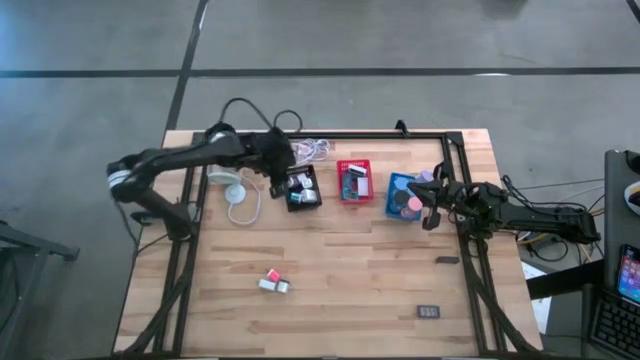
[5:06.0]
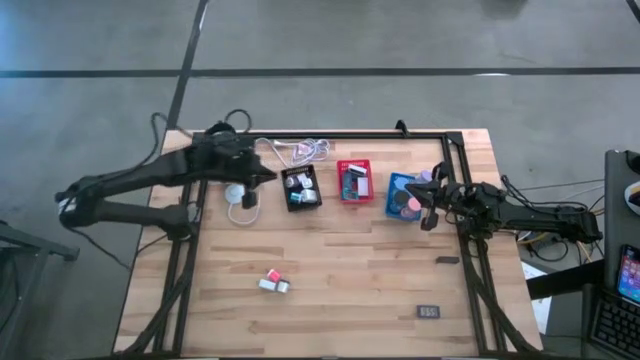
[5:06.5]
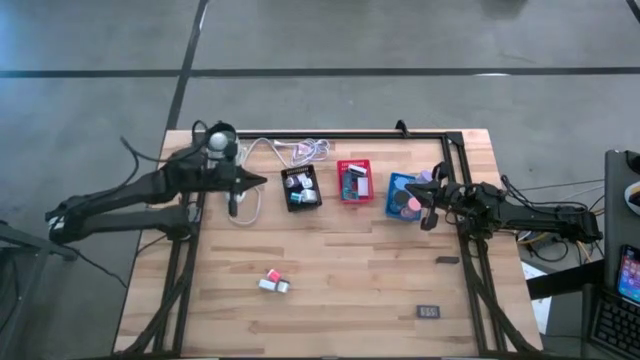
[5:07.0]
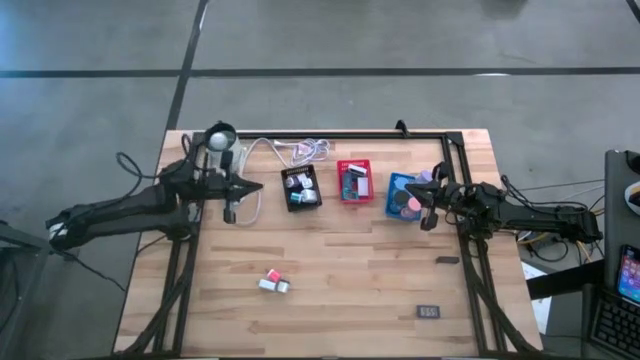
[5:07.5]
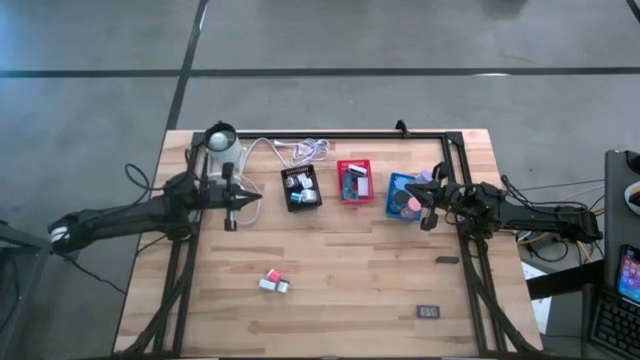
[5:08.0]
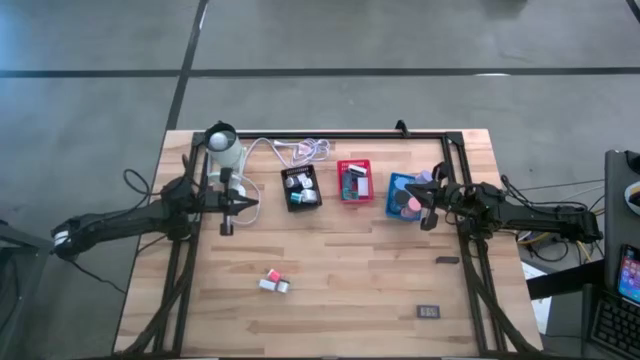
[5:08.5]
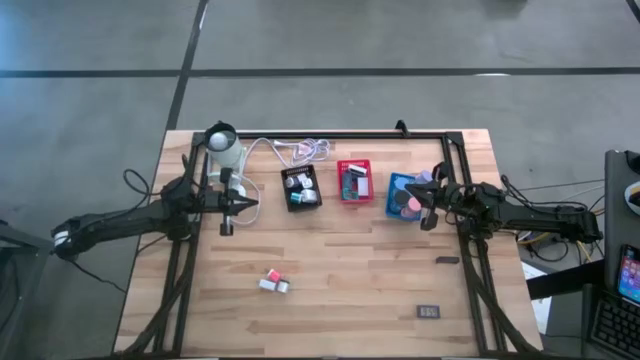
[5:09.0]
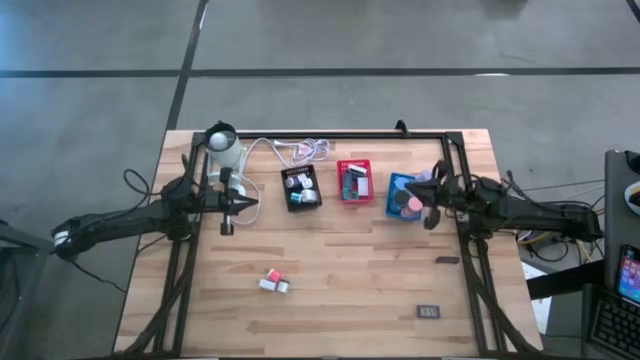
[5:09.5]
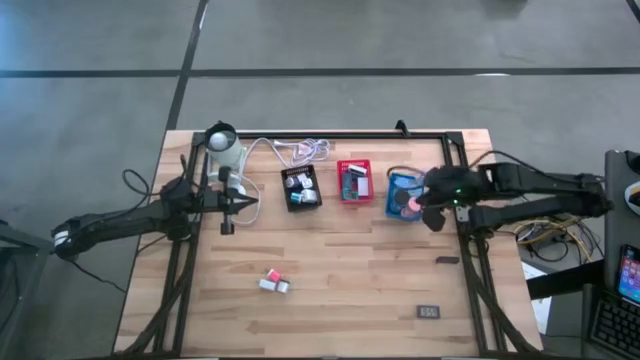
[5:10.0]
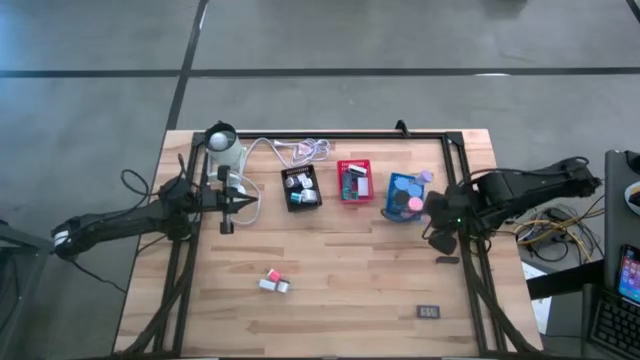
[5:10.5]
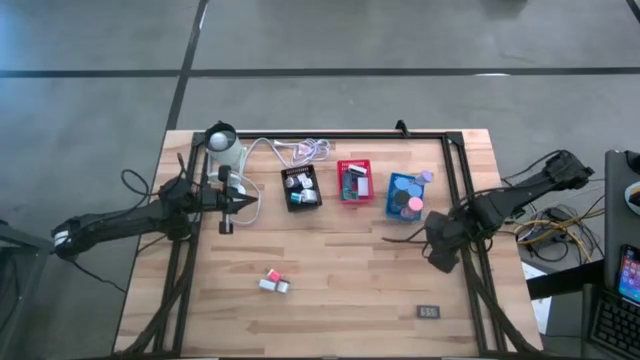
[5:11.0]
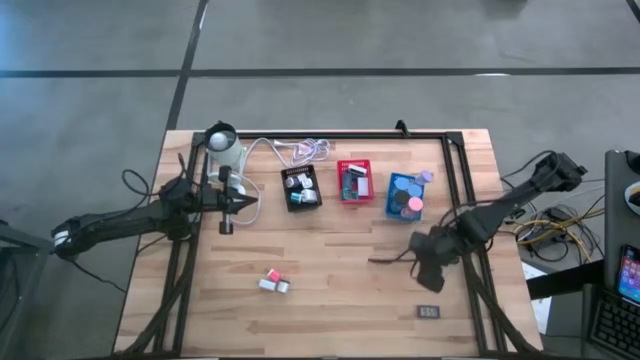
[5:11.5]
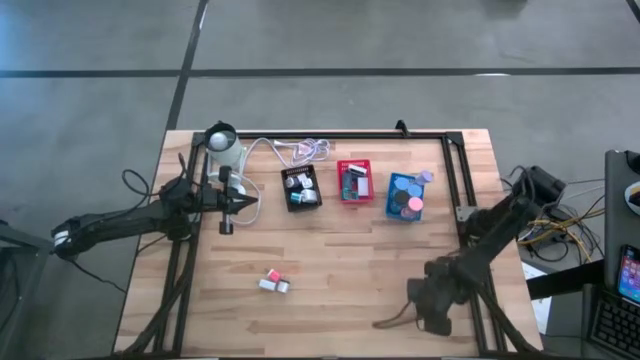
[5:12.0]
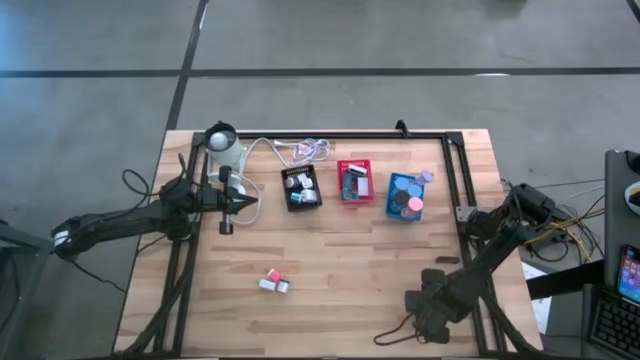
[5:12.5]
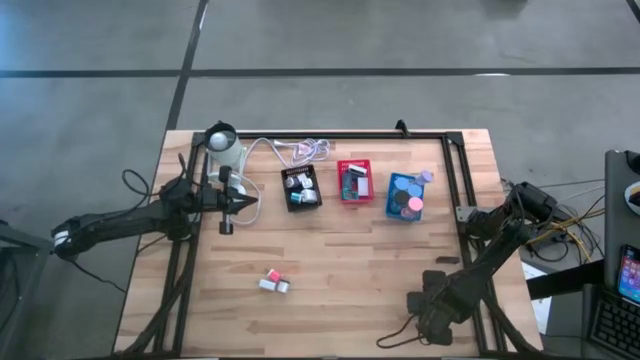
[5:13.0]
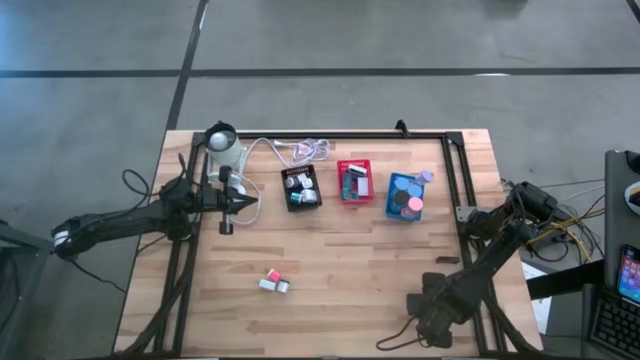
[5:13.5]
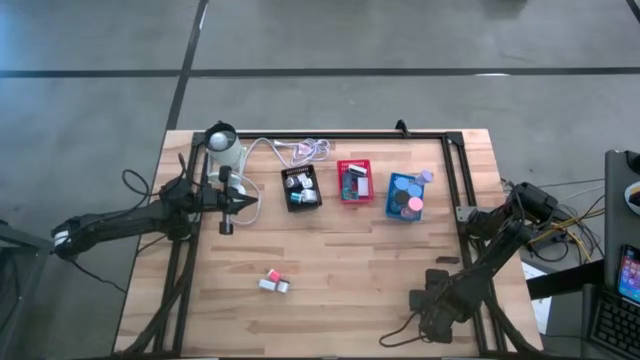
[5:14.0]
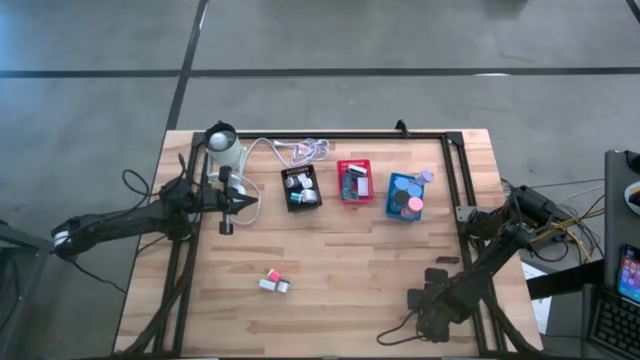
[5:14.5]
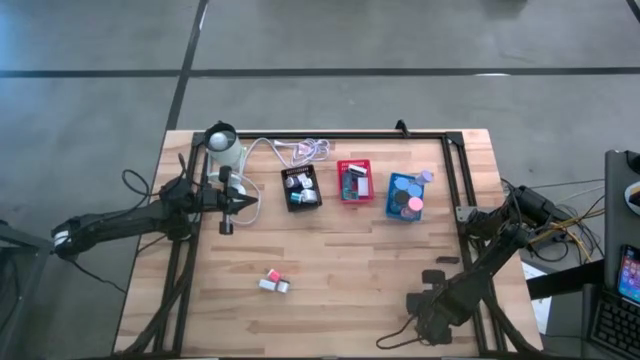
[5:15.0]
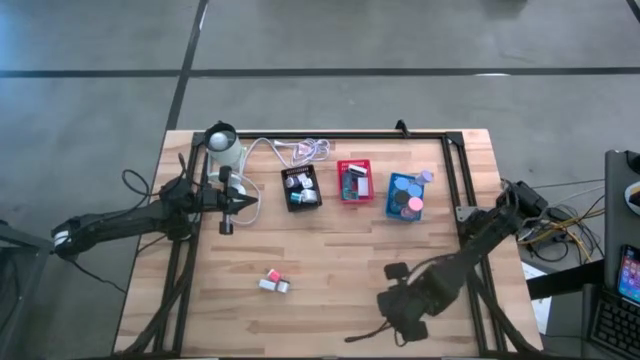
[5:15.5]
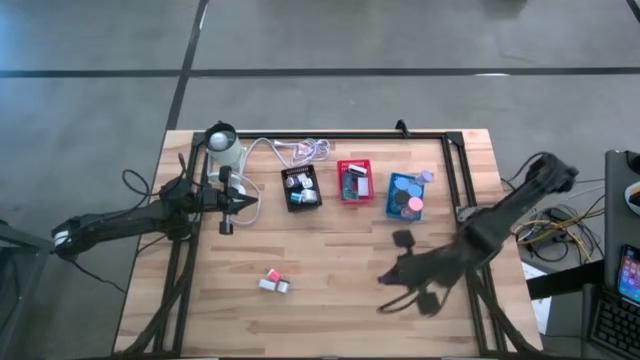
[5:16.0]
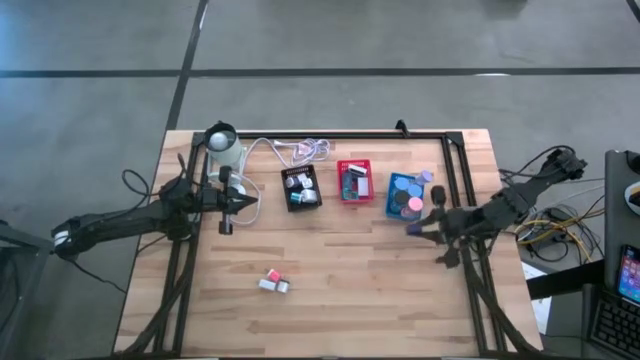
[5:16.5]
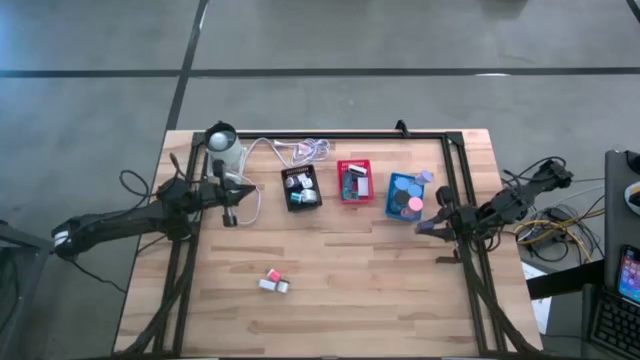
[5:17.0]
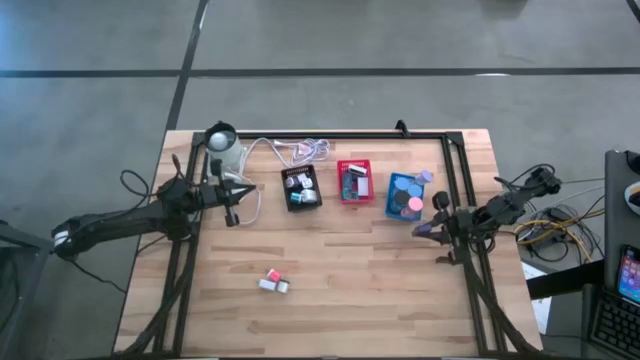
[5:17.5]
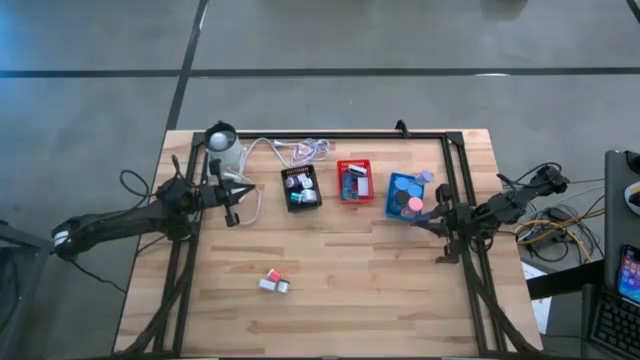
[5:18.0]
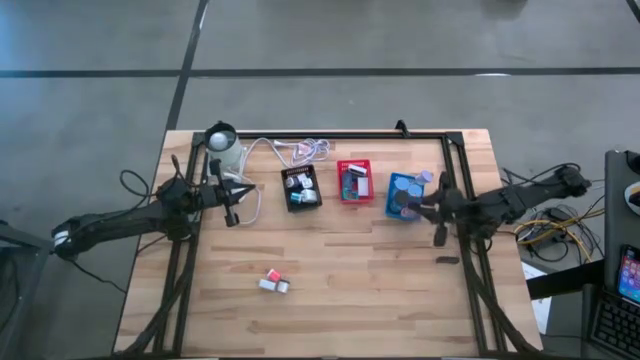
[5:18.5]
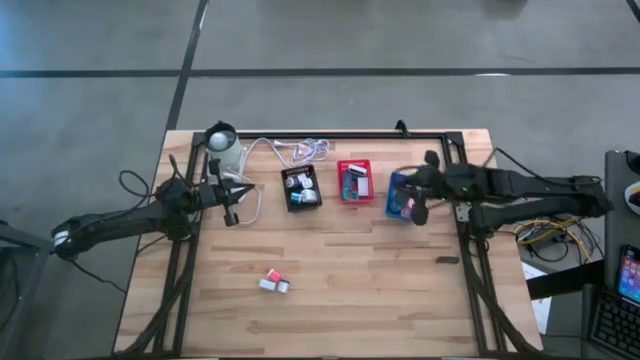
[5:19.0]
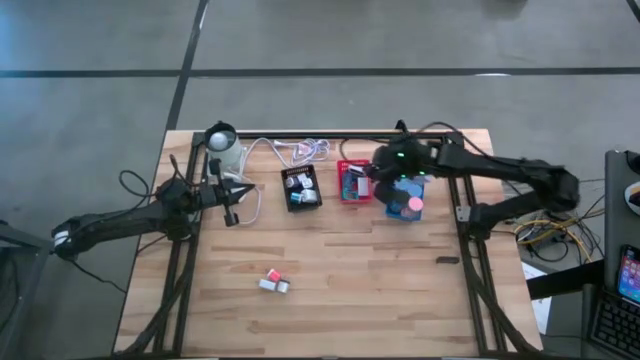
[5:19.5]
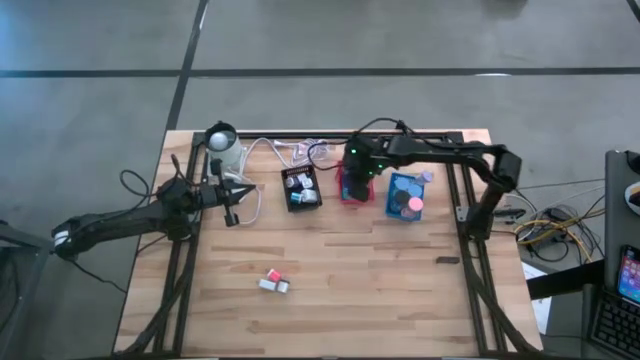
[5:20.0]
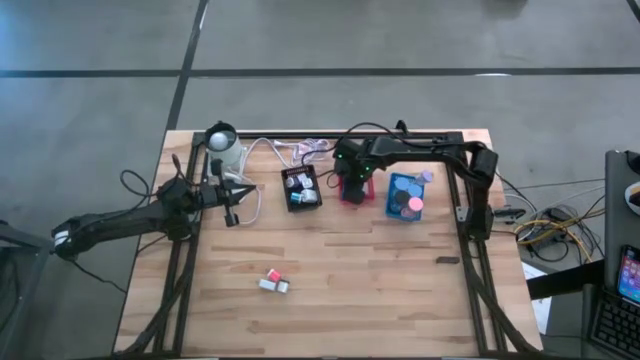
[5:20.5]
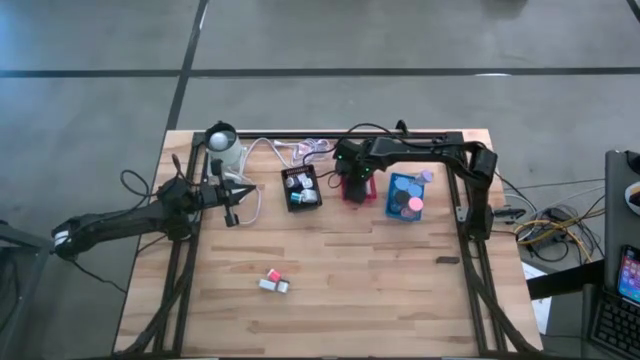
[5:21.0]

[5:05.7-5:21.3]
Task: Pick & Place Office items
Put the violet digital clock into the red bin

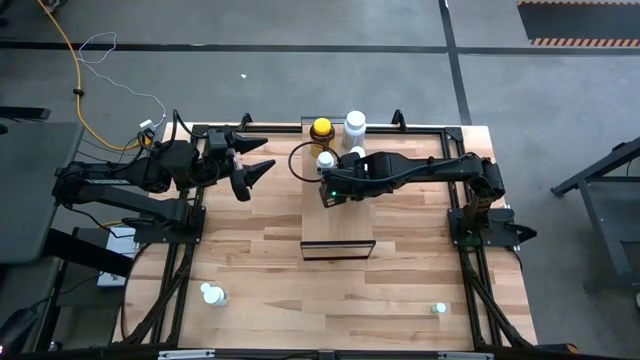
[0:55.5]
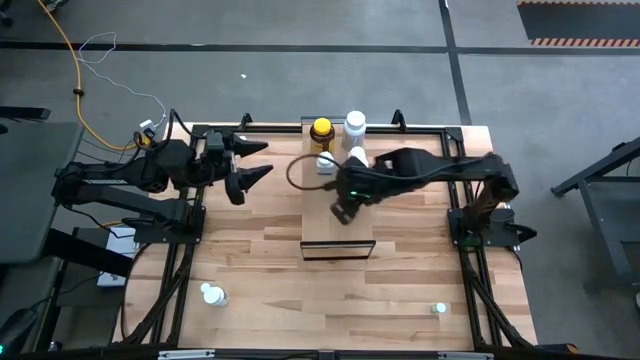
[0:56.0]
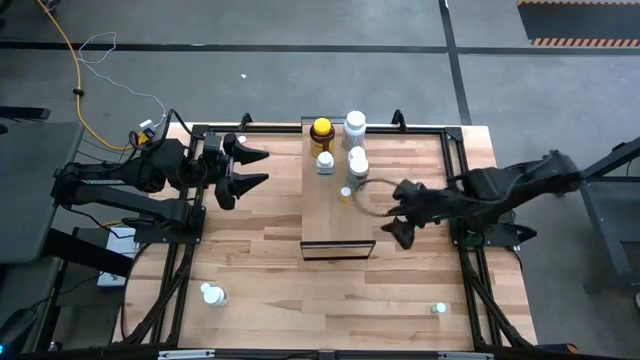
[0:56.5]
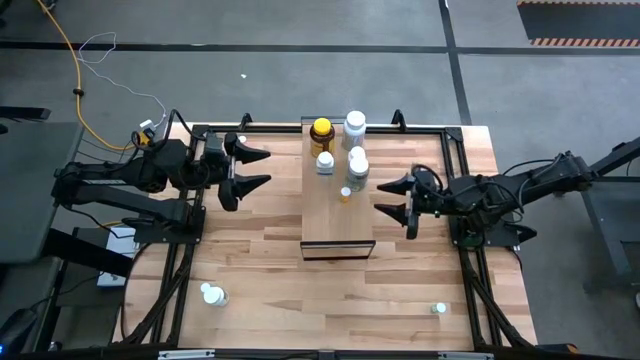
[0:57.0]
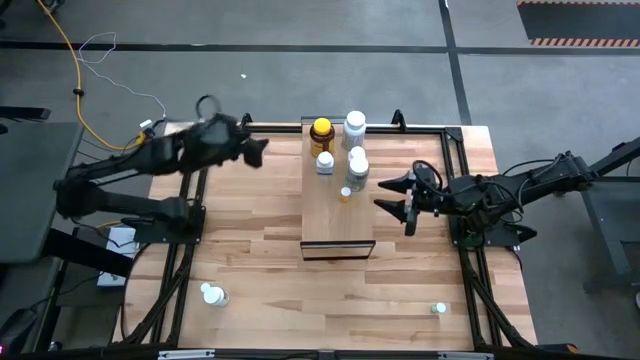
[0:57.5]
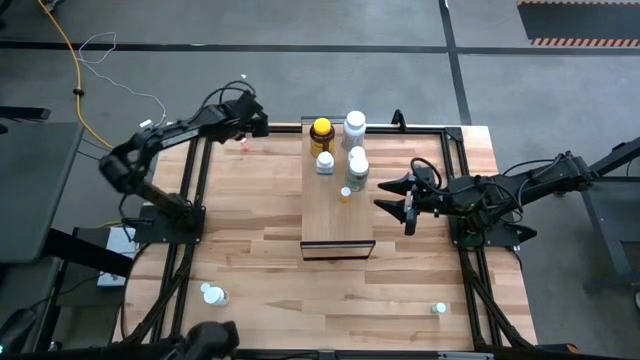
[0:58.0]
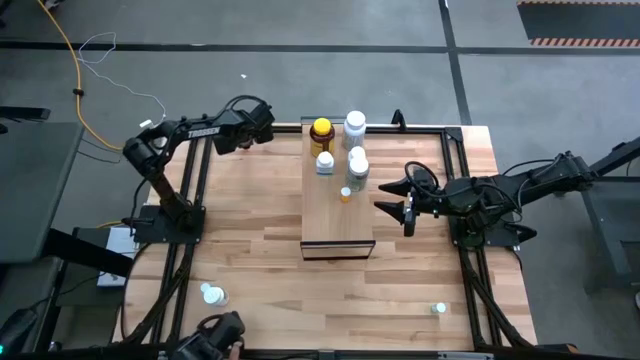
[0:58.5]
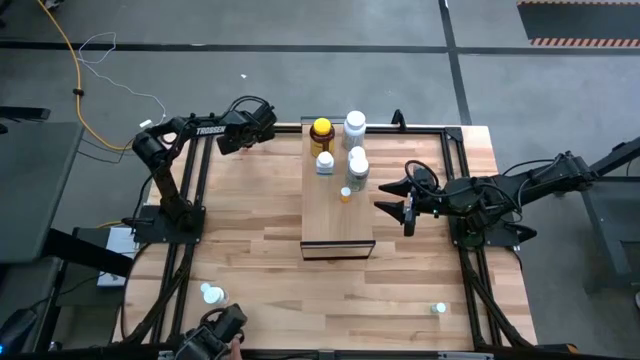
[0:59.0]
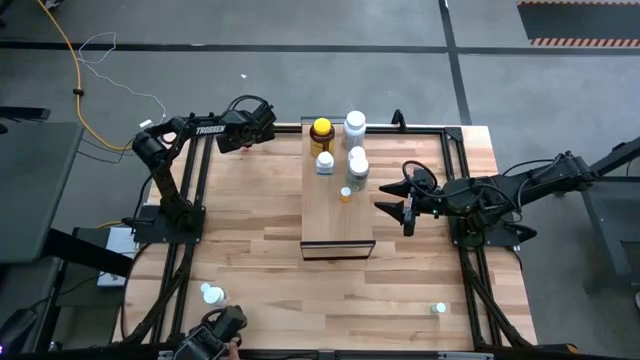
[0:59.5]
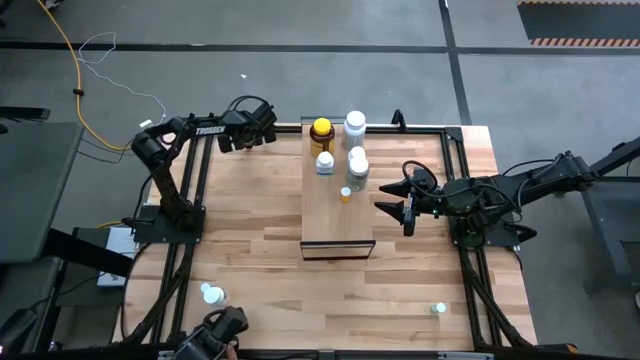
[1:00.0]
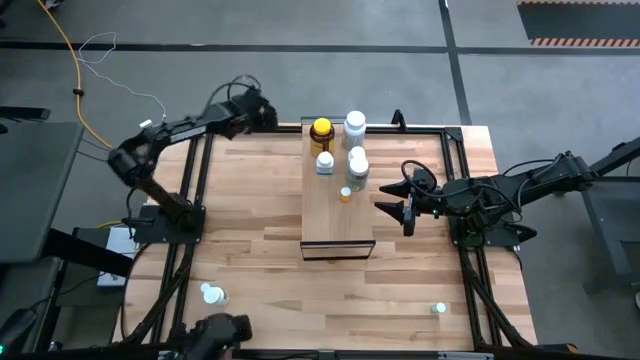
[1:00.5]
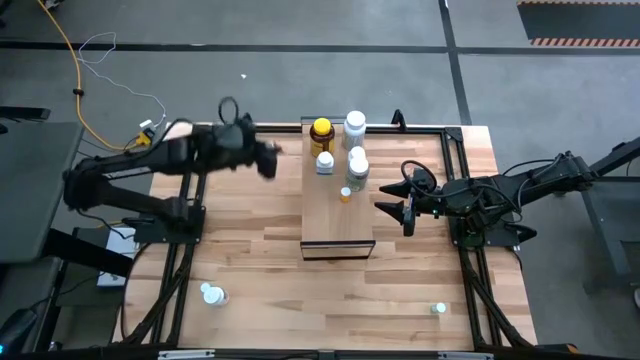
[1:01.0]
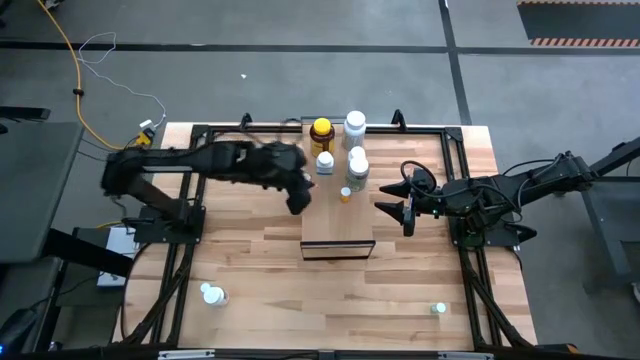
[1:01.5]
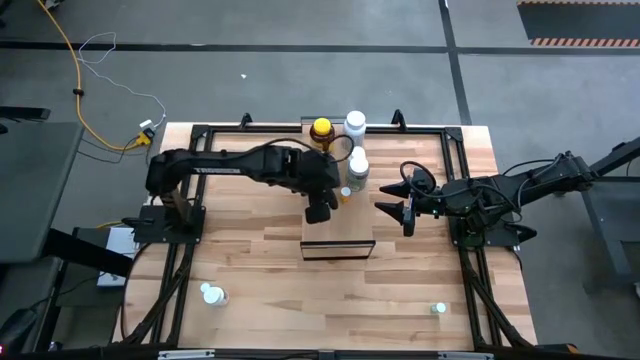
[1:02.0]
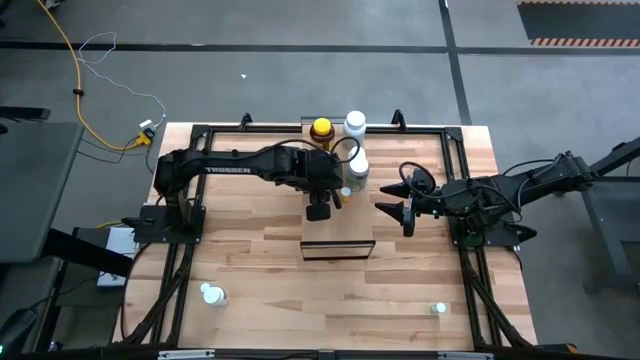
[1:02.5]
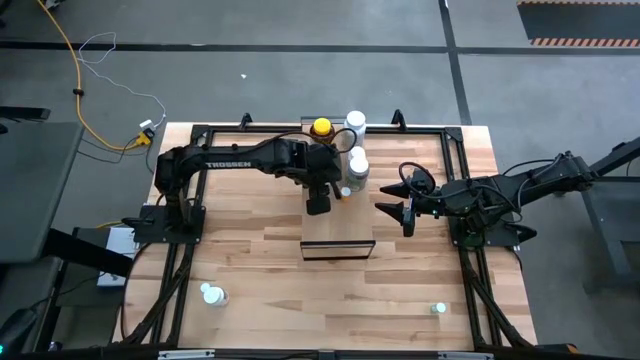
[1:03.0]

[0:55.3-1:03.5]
Task: Pick and place medicine bottles onto shelf by color
Put the pink pill bottle on the shelf
